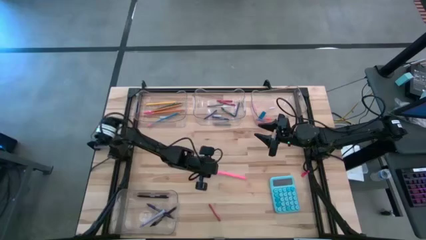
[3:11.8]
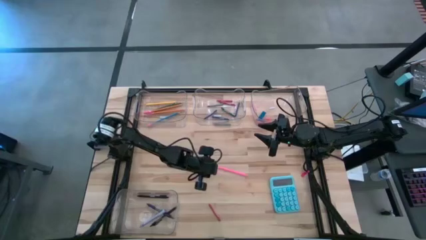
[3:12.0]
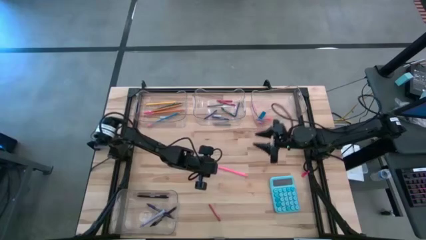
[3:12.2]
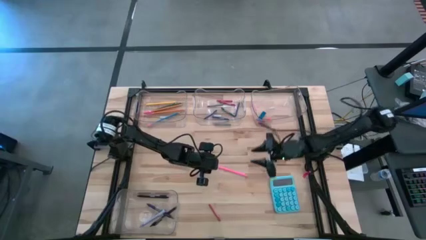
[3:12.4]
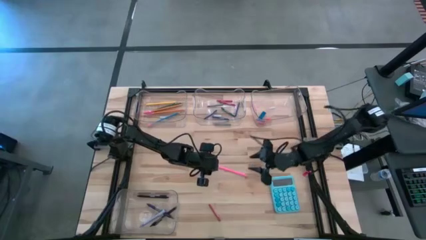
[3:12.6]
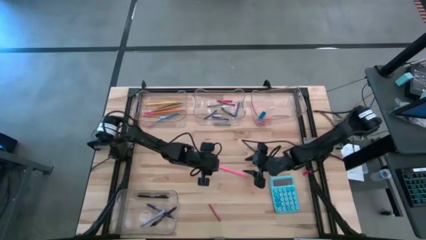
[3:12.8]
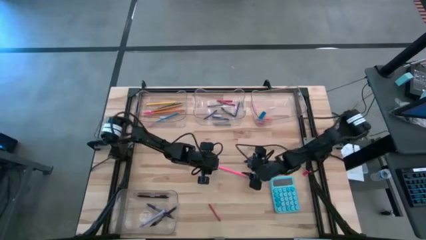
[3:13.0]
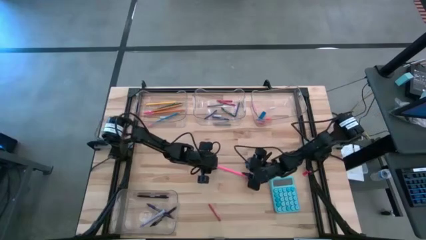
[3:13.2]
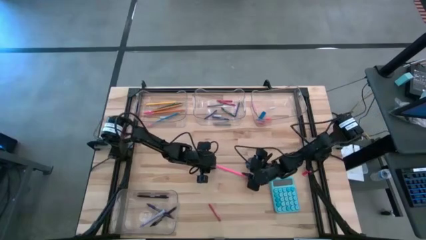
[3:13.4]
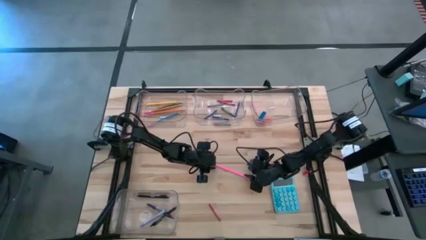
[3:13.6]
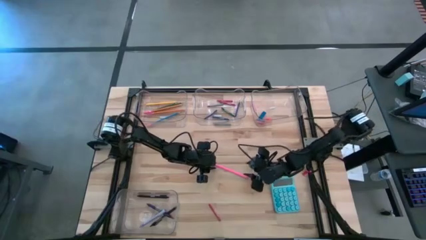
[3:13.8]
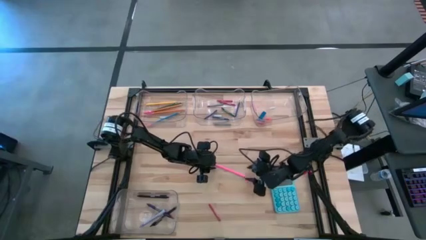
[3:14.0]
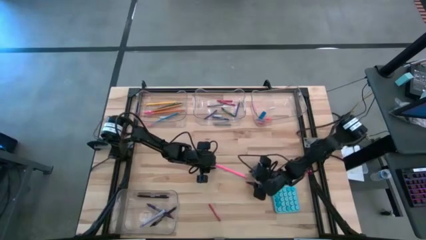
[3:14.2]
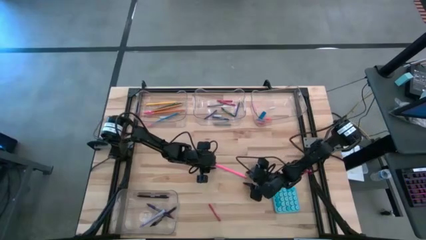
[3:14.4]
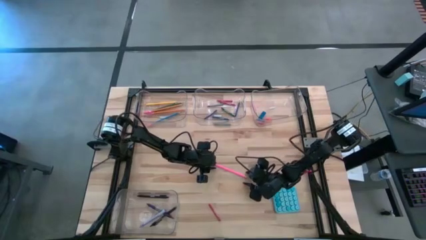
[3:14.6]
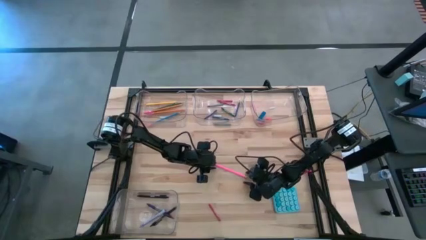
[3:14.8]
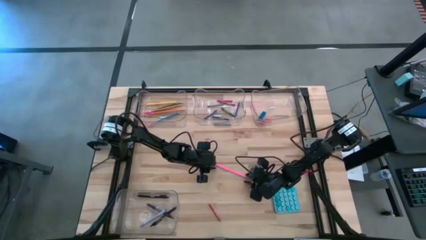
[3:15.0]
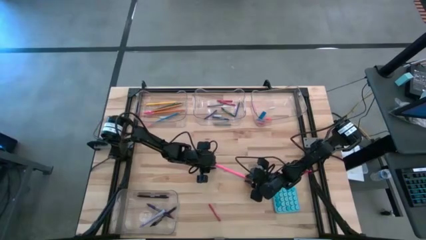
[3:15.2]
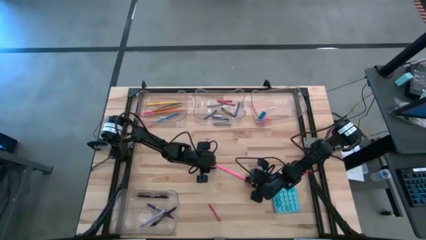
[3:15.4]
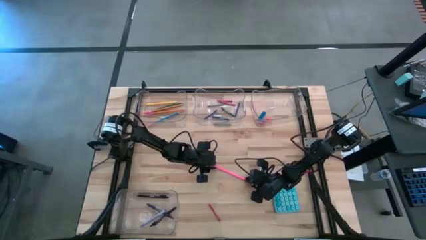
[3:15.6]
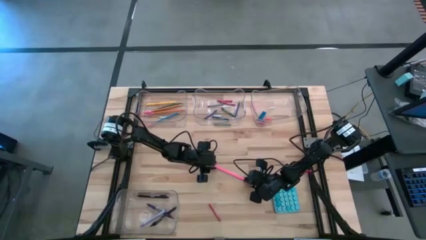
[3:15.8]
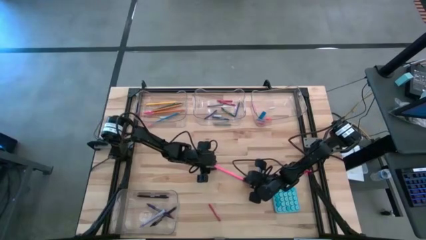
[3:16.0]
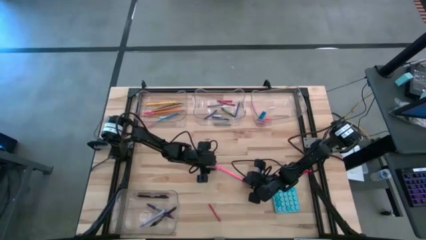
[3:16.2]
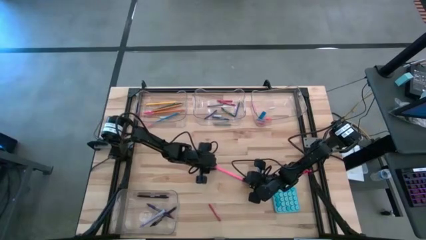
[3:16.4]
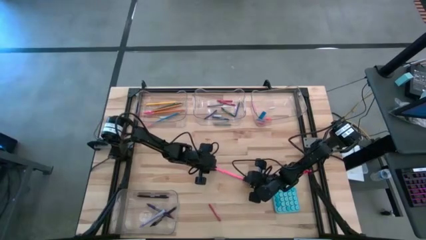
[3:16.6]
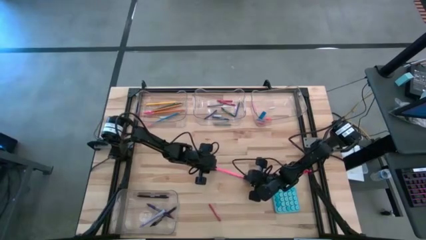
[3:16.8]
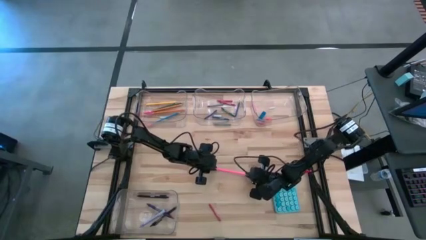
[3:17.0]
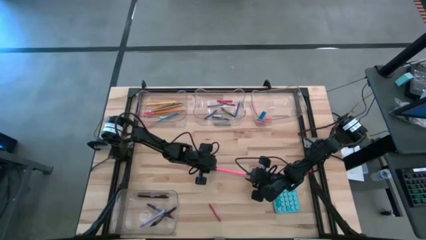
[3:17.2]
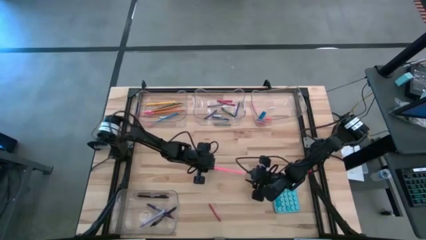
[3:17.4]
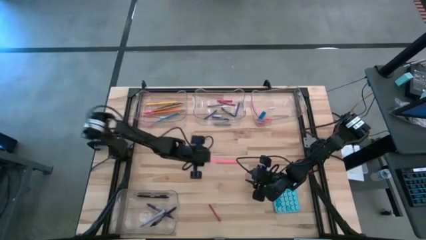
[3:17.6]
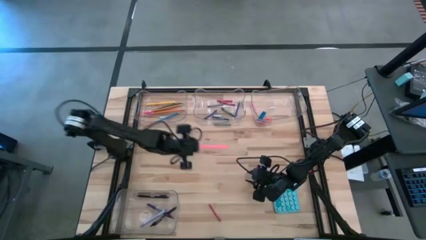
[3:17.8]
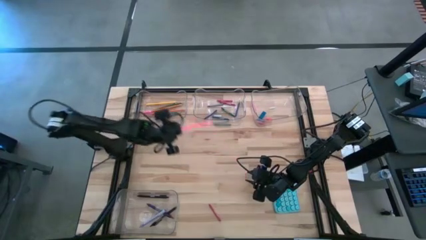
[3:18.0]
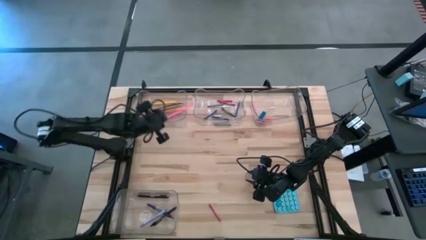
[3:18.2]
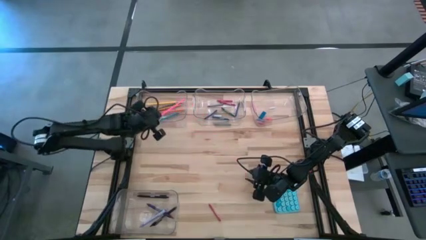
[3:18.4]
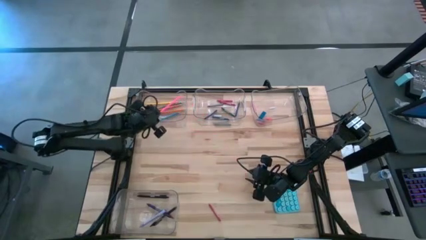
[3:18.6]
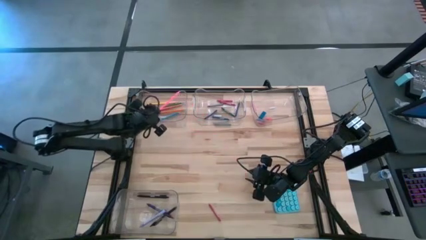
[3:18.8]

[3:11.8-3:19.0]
Task: Sort crayons/erasers/pens/pencils in bins
Put the pink pencil into the top left transparent bin

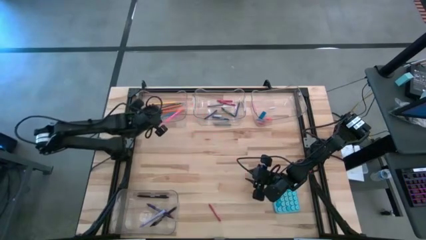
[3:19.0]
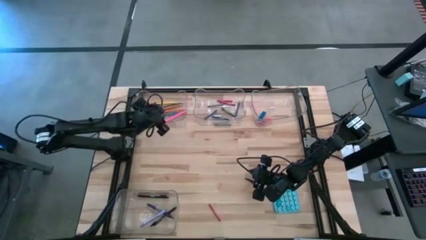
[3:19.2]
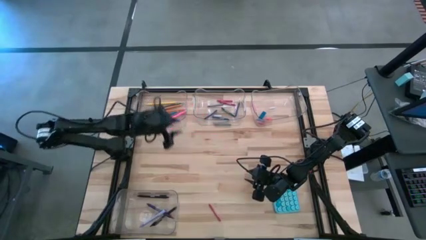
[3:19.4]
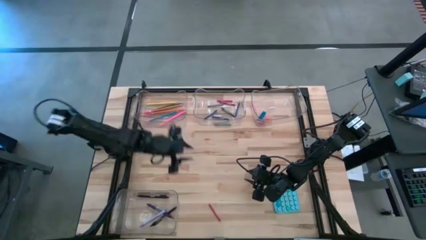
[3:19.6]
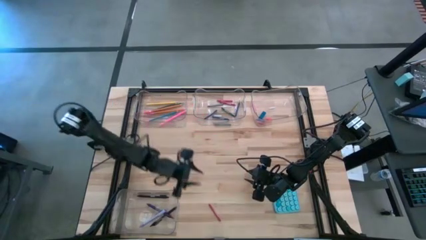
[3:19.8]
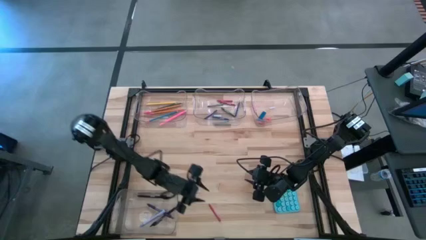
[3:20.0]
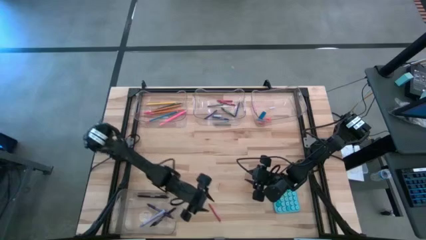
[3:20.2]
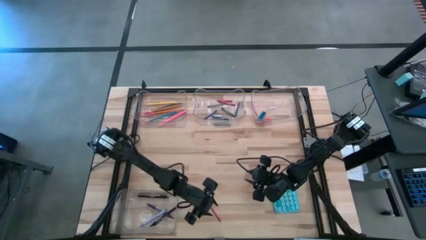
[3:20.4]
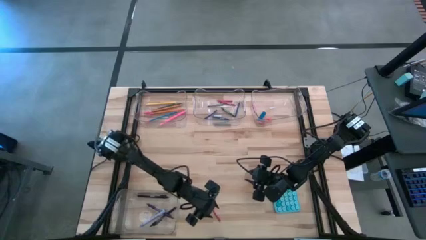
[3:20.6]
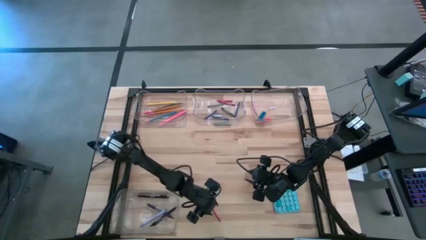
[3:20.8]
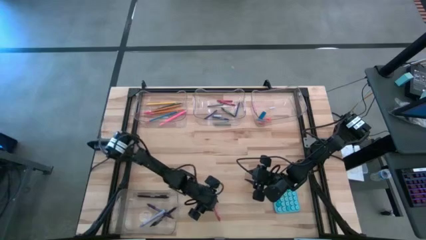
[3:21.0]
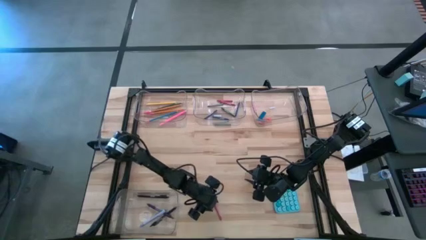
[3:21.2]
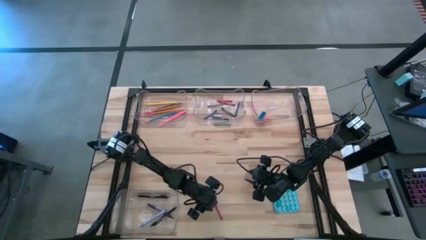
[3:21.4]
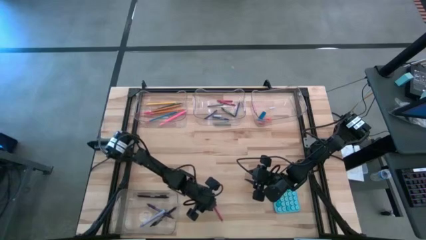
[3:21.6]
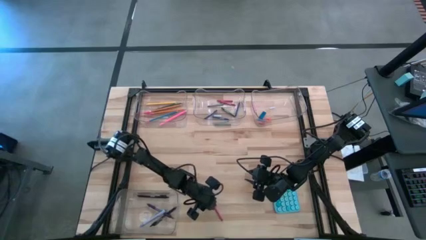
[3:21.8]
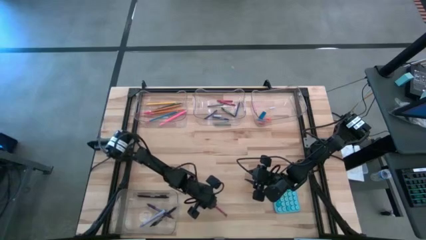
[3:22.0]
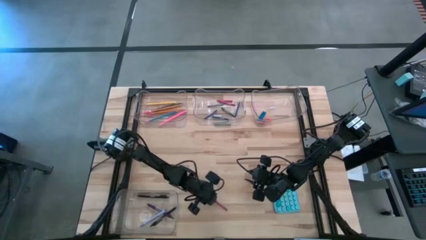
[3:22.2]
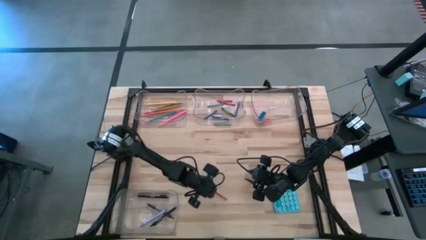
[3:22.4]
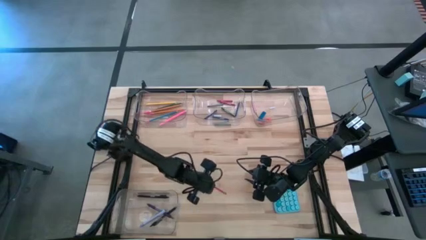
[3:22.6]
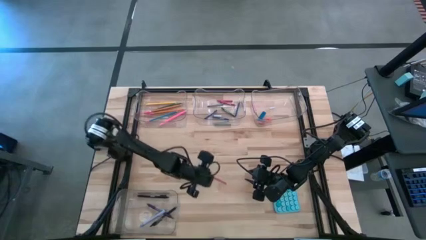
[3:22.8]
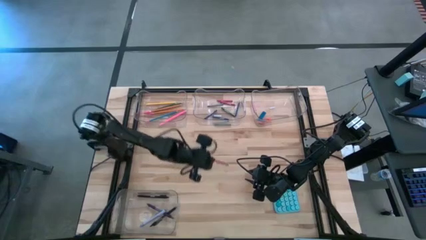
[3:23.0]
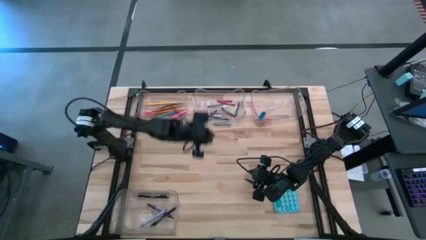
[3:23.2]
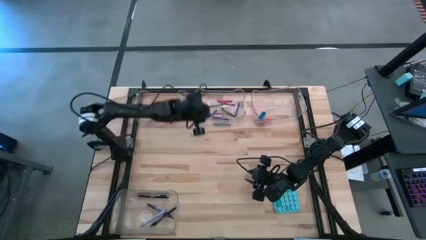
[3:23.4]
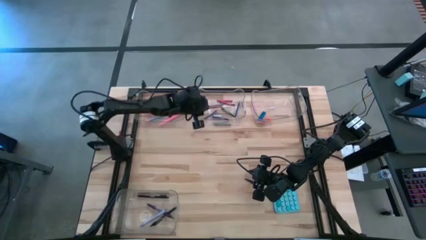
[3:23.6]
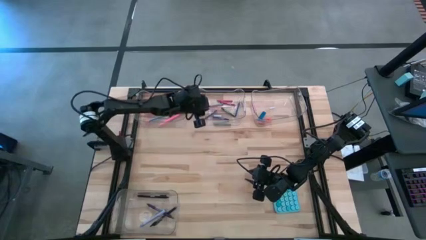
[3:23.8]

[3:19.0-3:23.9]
Put the red crayon into the top middle transparent bin

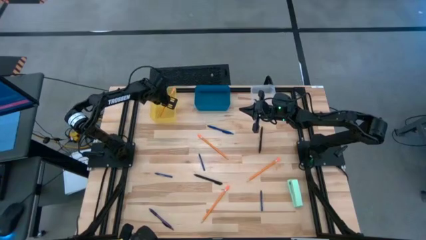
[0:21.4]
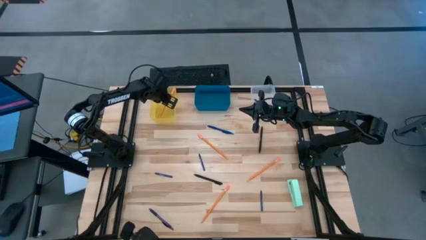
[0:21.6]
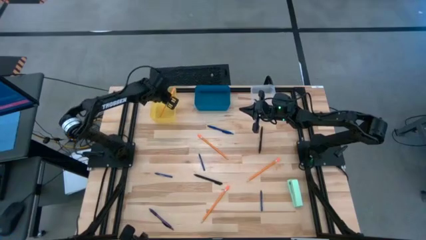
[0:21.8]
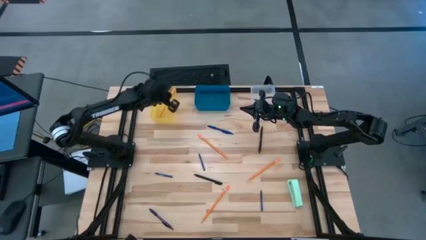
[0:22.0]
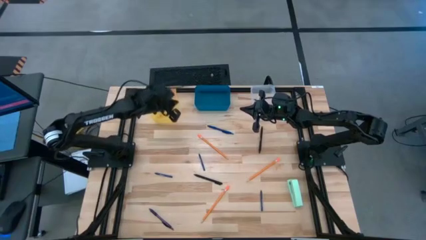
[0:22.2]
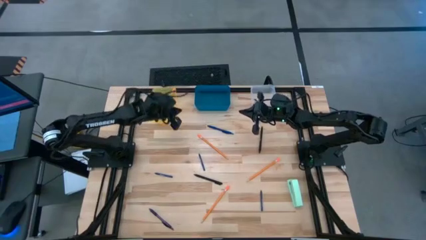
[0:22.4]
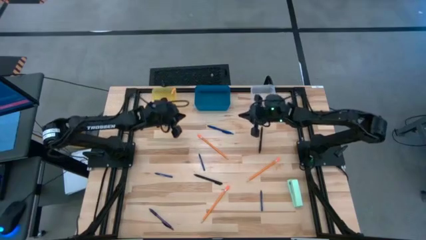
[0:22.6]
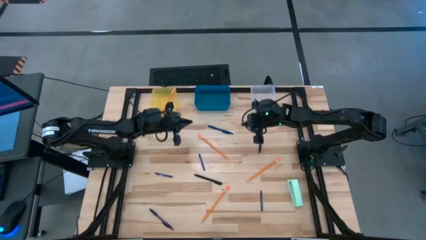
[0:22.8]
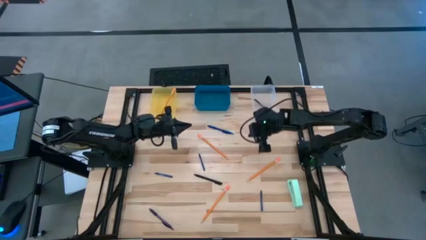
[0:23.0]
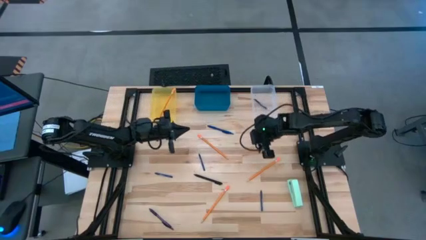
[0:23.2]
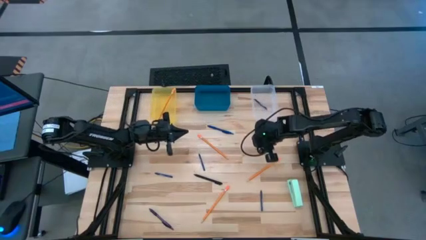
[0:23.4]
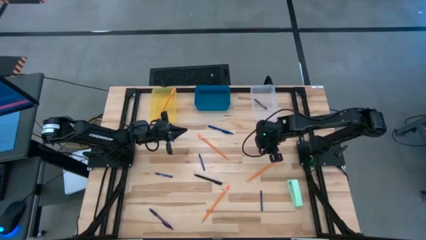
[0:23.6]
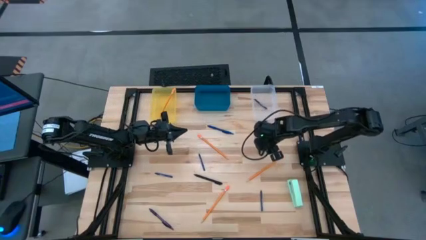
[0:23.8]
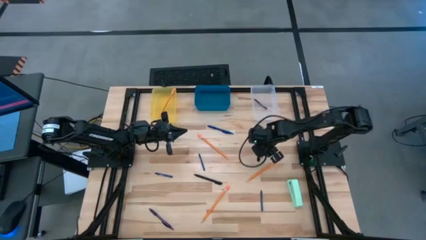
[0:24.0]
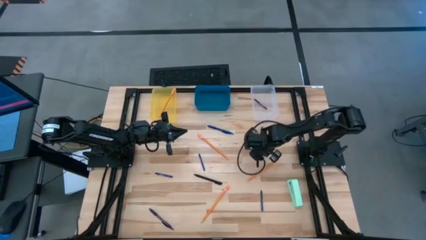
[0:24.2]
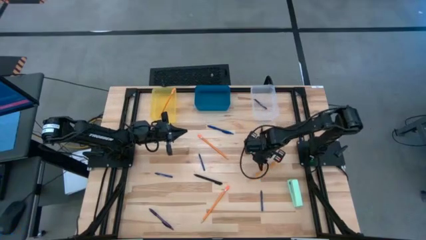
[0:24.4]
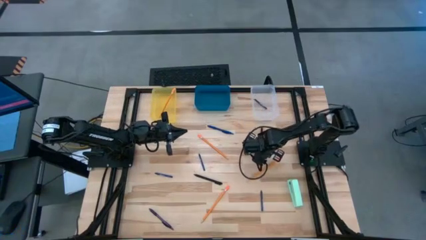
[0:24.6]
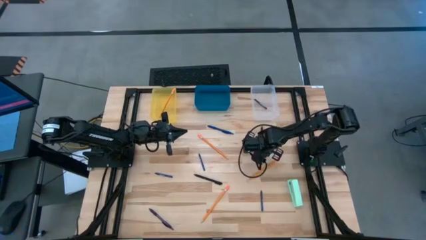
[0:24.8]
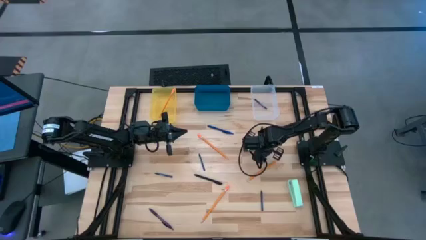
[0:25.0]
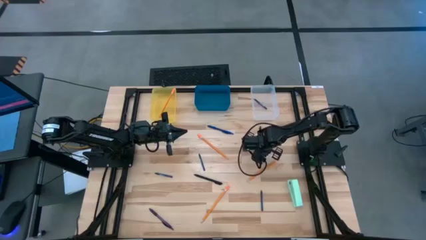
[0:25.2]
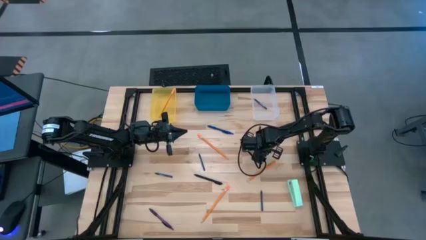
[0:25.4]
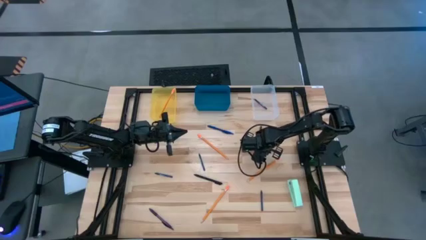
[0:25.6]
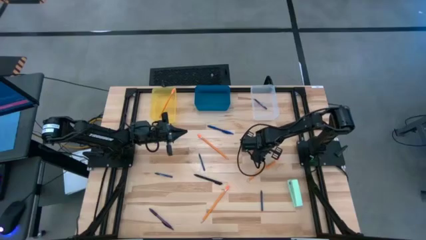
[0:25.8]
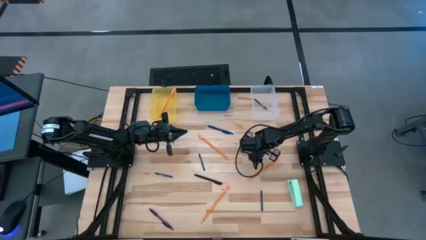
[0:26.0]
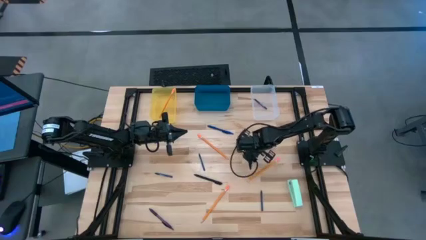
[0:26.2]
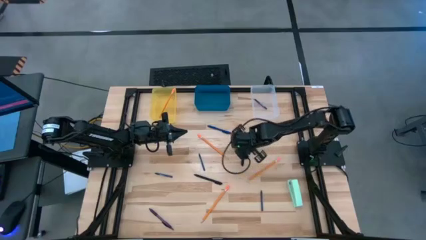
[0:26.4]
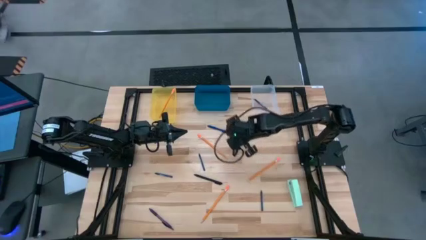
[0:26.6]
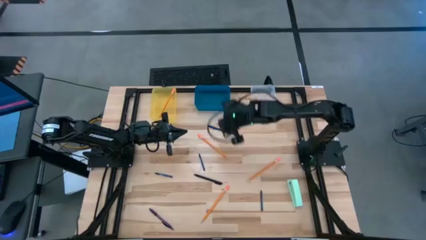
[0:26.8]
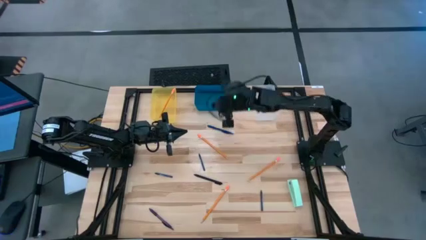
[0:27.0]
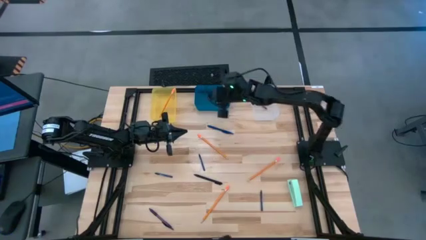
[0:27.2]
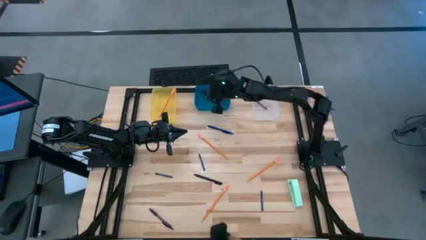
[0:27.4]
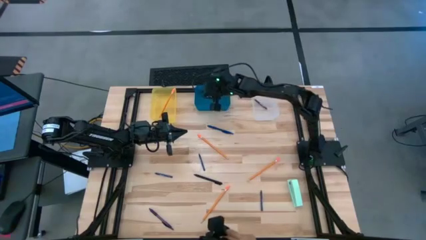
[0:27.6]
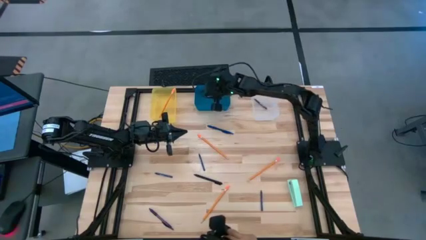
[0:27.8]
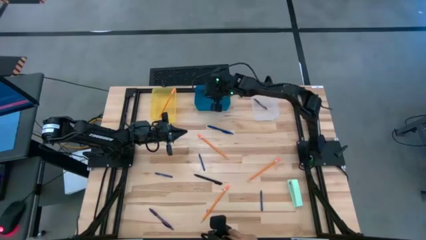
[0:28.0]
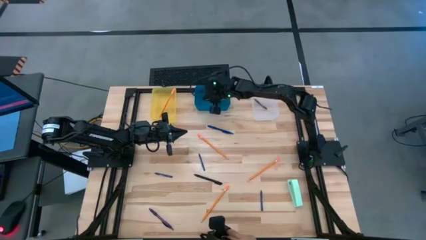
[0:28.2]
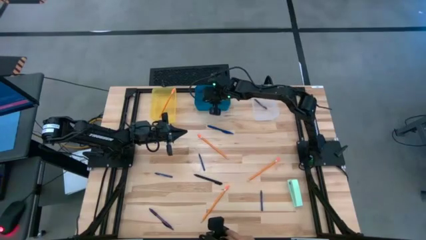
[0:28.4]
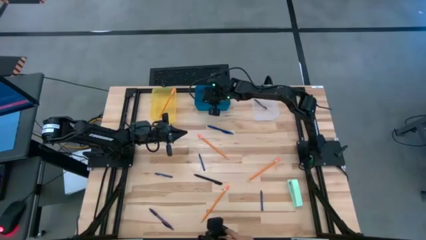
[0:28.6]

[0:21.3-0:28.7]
Task: Sort crayons/erasers/pens/pencils in bins
Put the black pen into the transparent blue bin
